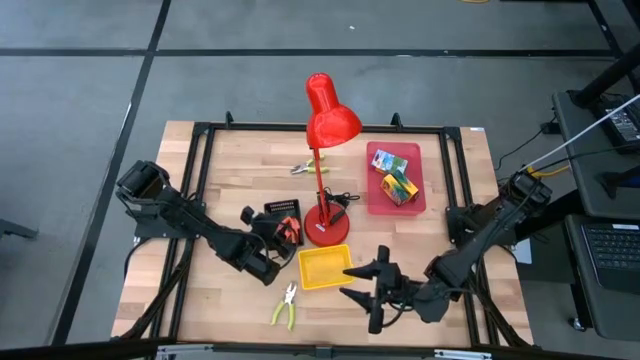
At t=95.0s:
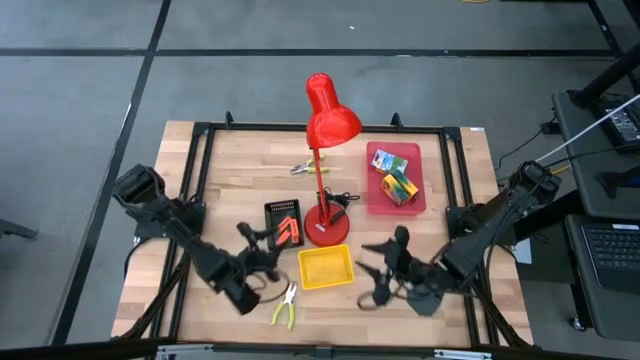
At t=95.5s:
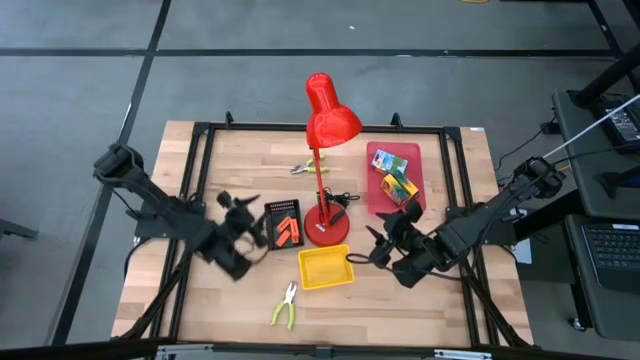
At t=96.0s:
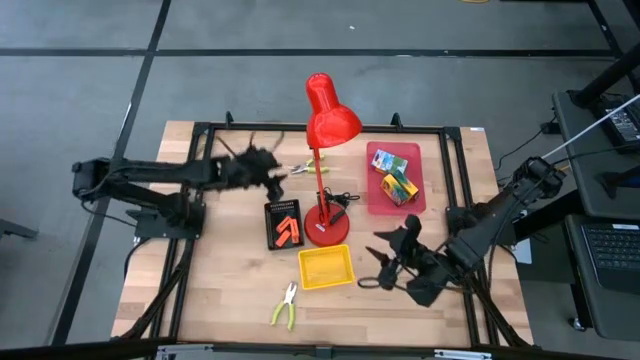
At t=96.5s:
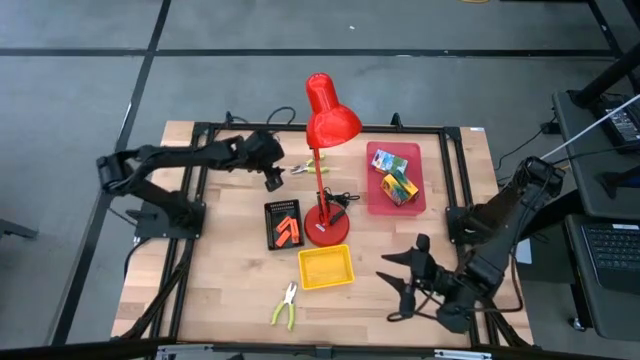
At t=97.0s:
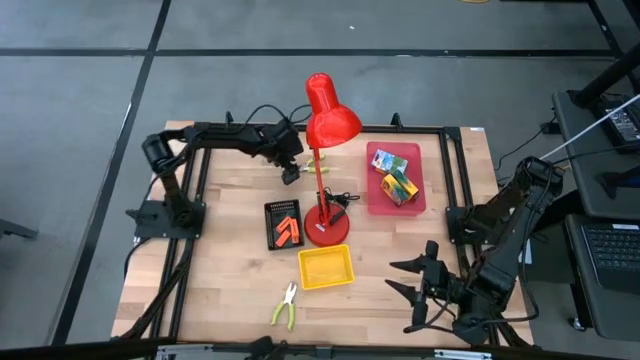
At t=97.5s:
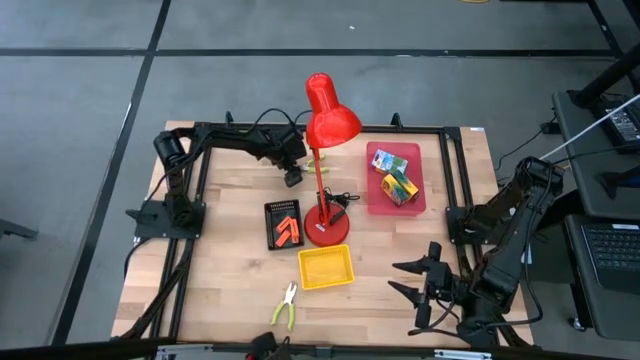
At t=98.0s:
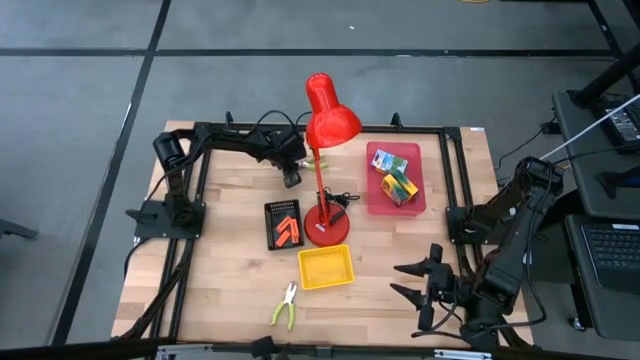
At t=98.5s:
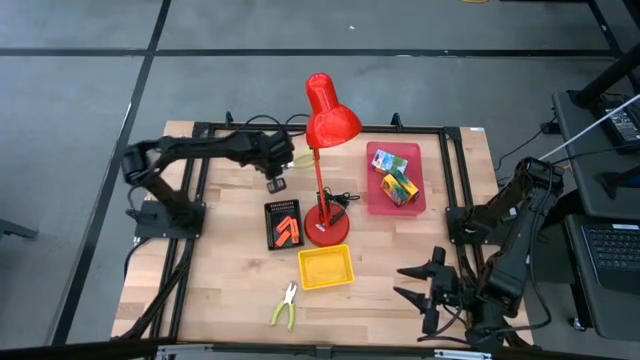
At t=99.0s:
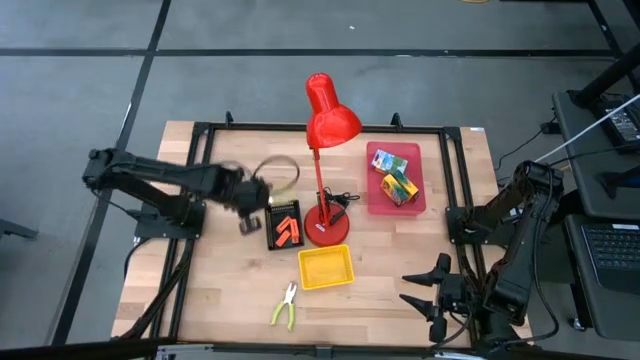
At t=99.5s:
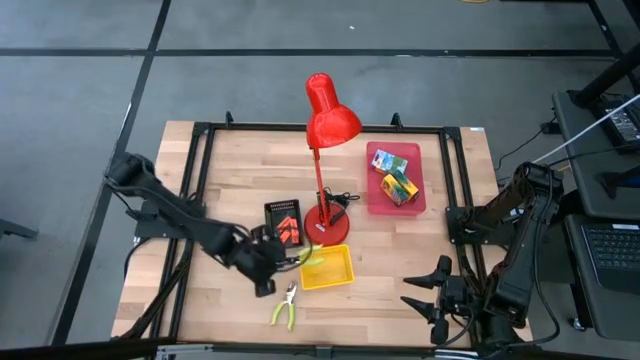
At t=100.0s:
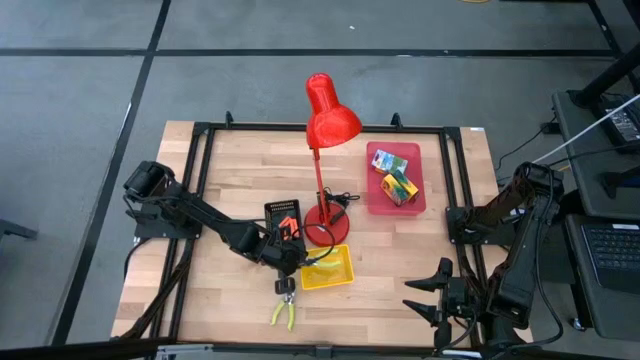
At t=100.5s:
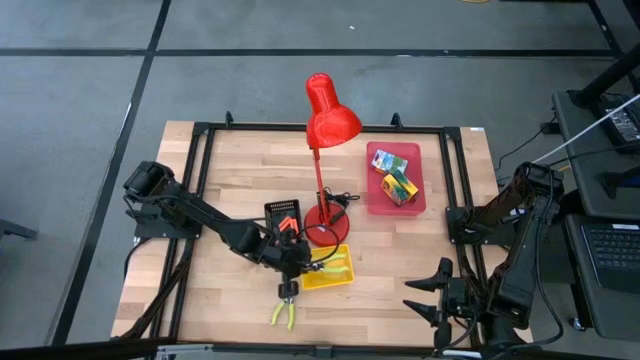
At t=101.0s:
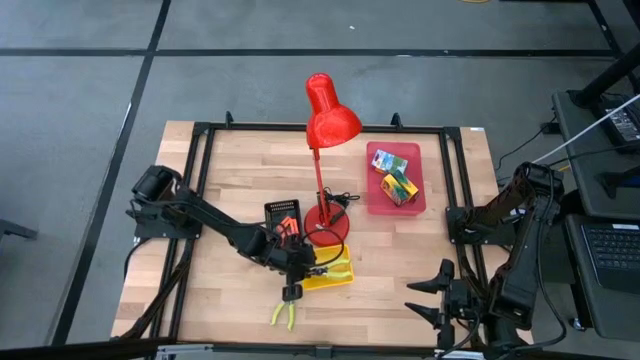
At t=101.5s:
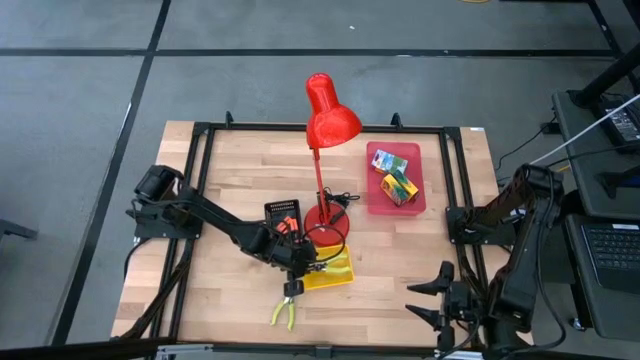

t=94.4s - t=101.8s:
Task: Pick & Place School Supplies
Put the hole puncher into the yellow bin

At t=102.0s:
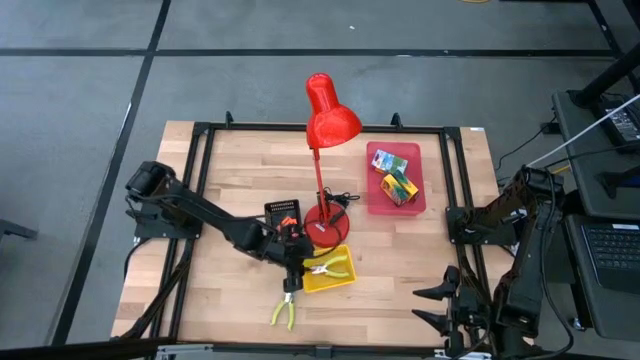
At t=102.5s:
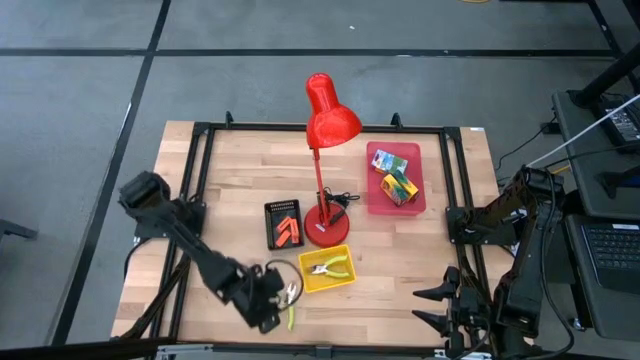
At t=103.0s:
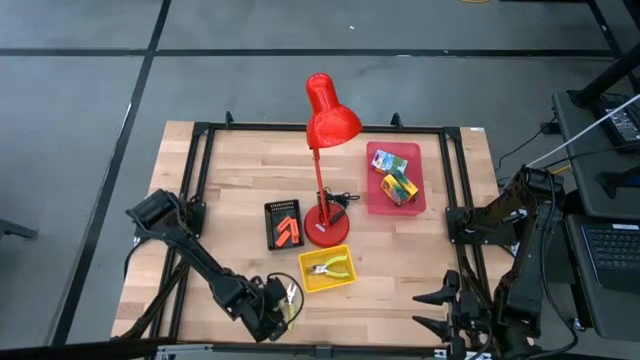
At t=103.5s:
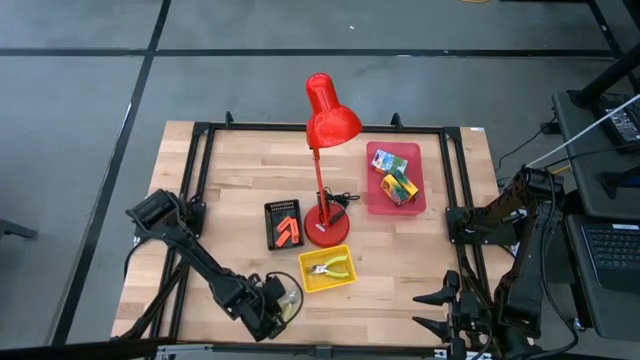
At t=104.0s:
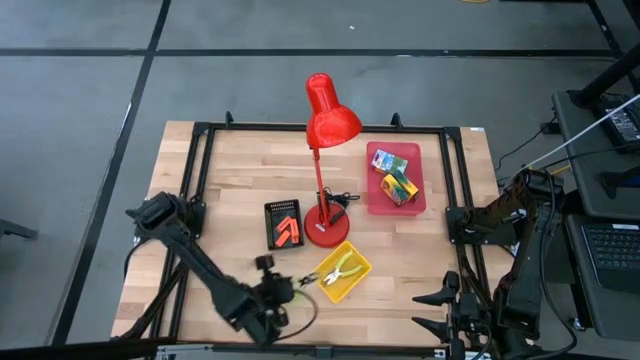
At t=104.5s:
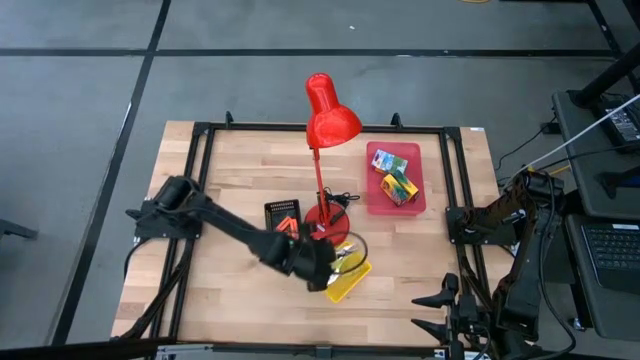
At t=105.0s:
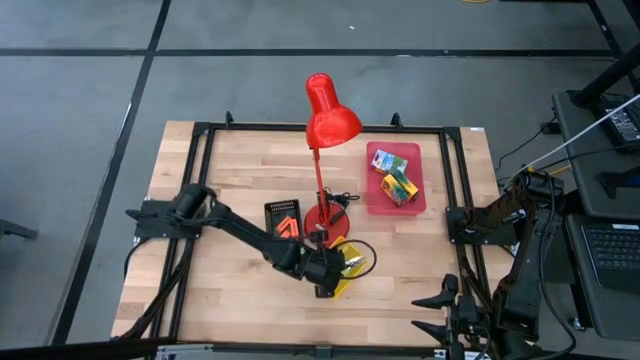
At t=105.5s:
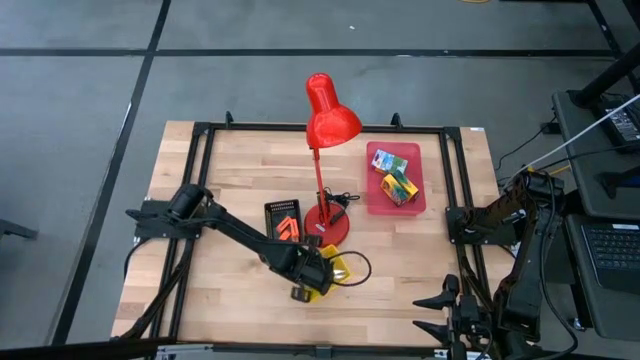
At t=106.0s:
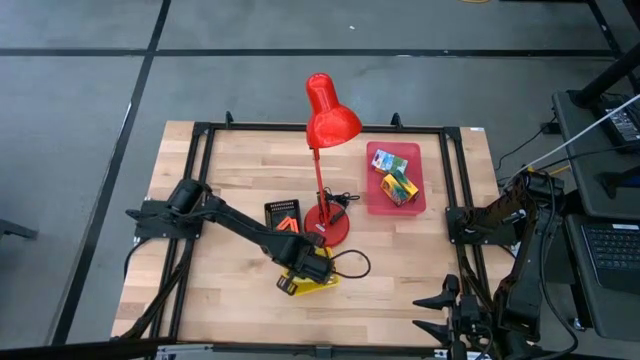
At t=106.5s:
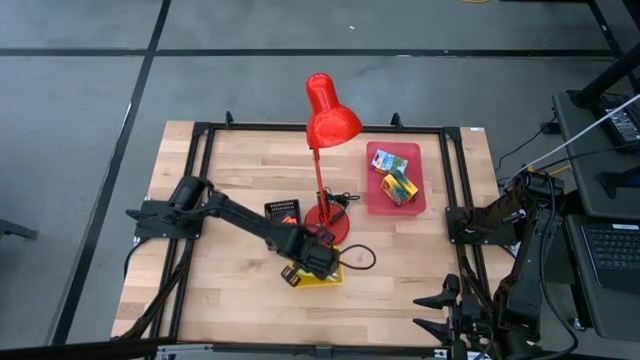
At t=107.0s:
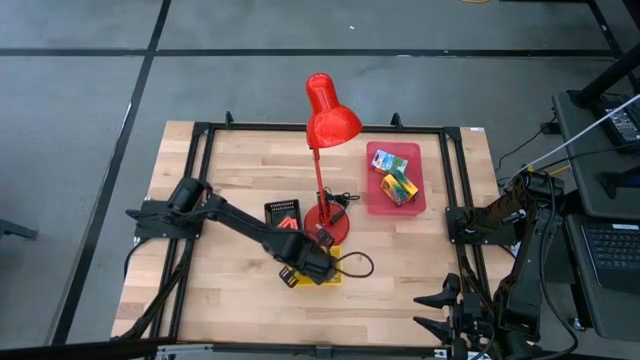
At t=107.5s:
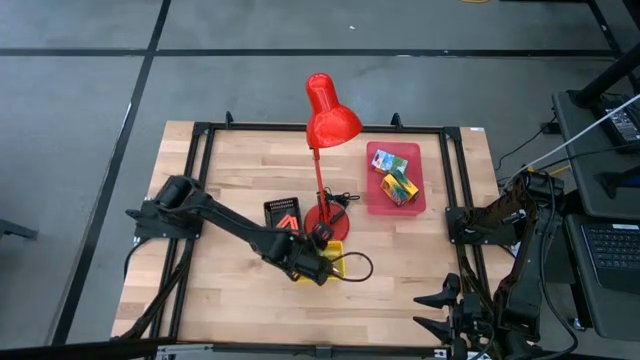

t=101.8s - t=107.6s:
Put the hole puncher into the yellow bin

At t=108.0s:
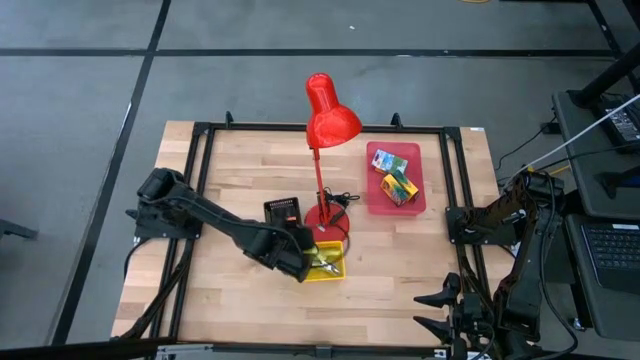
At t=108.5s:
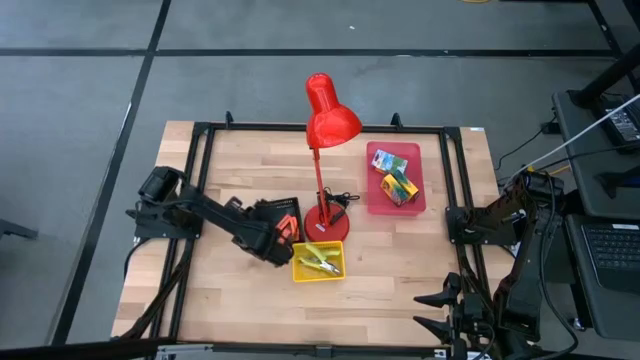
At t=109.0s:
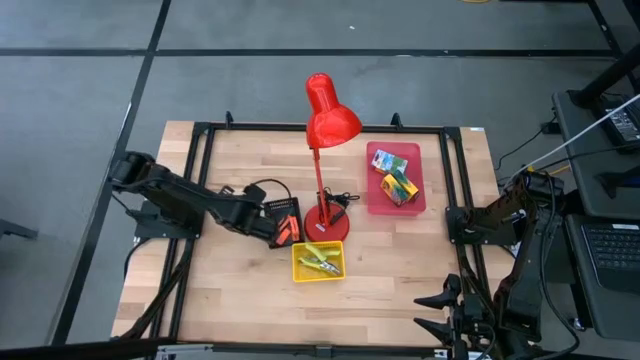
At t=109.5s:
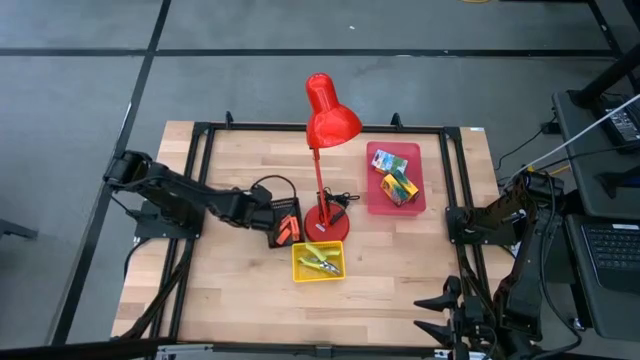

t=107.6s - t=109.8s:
Adjust the black bin

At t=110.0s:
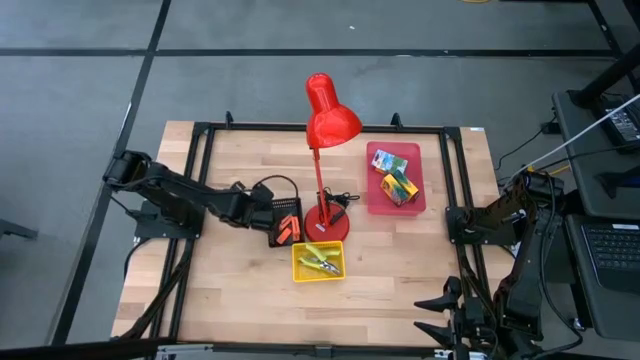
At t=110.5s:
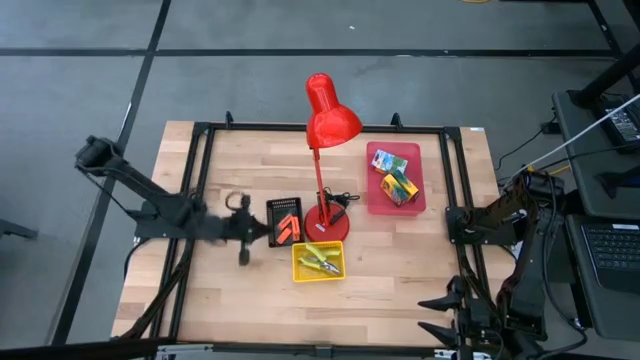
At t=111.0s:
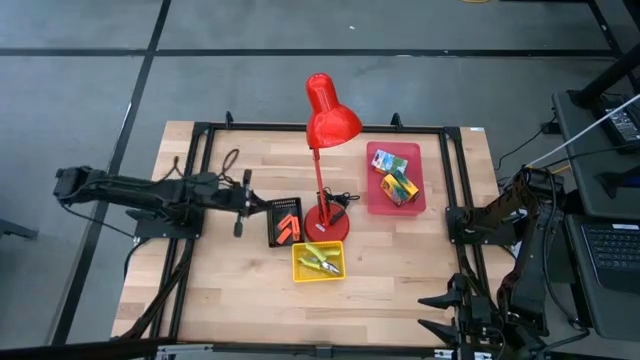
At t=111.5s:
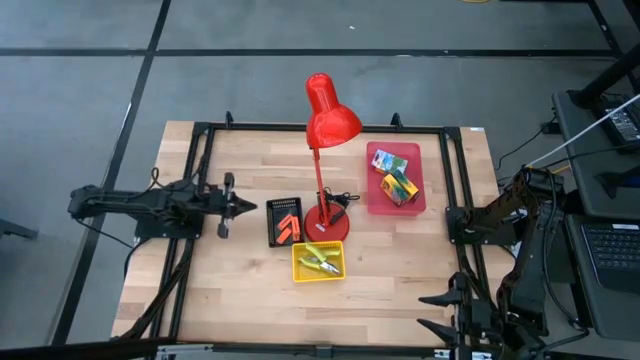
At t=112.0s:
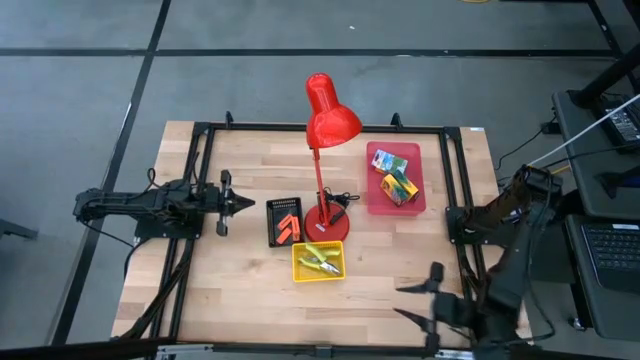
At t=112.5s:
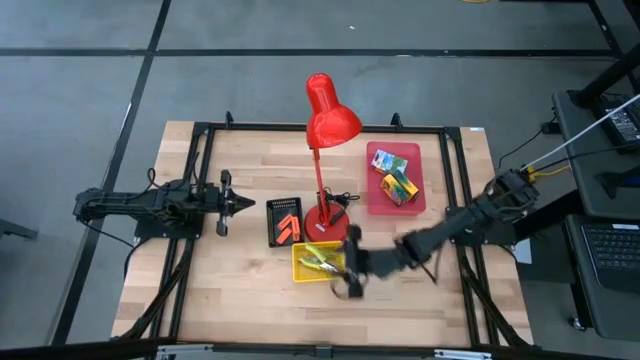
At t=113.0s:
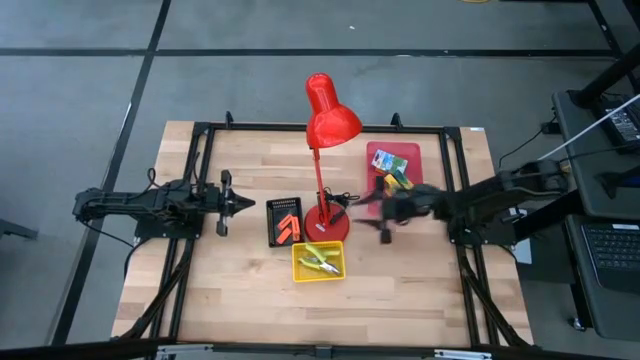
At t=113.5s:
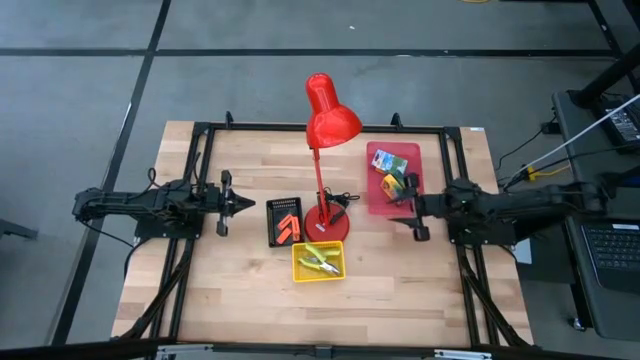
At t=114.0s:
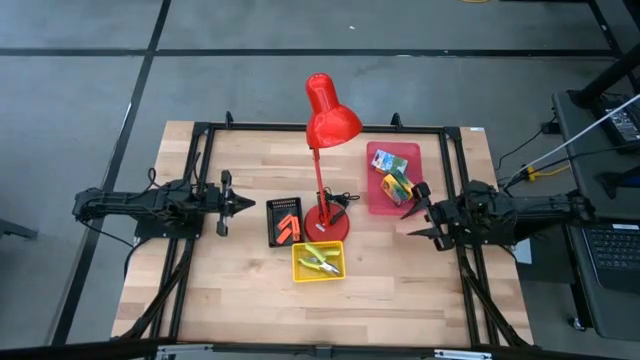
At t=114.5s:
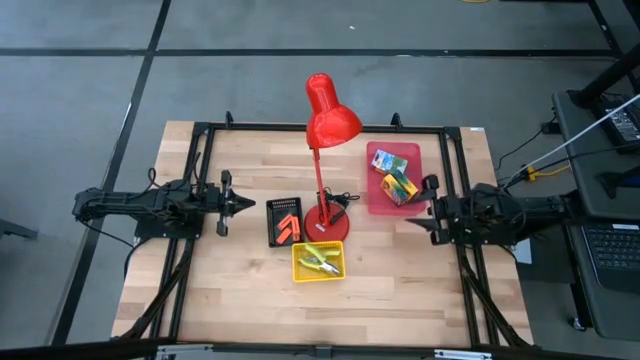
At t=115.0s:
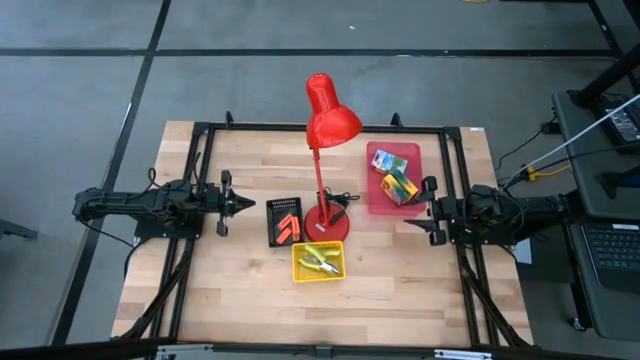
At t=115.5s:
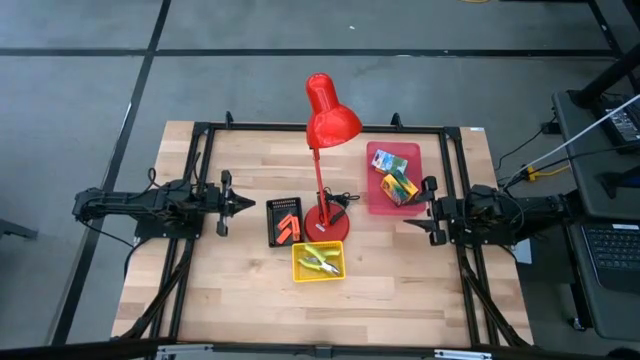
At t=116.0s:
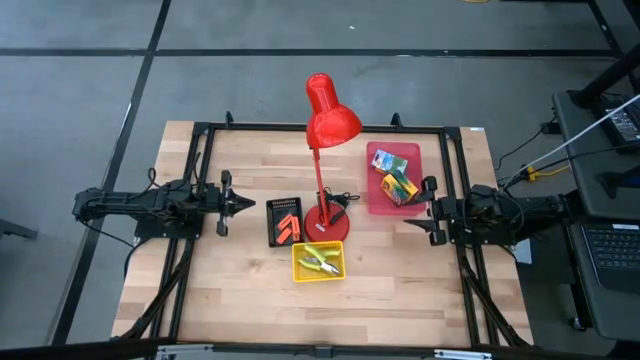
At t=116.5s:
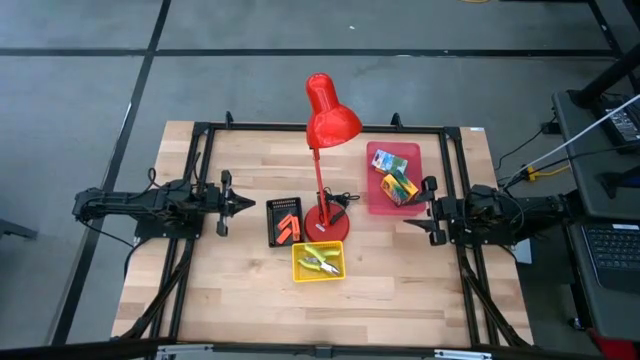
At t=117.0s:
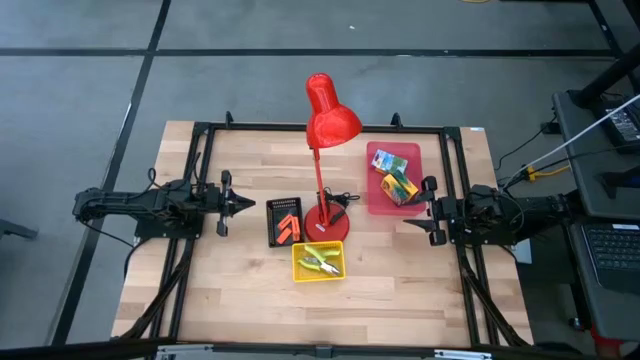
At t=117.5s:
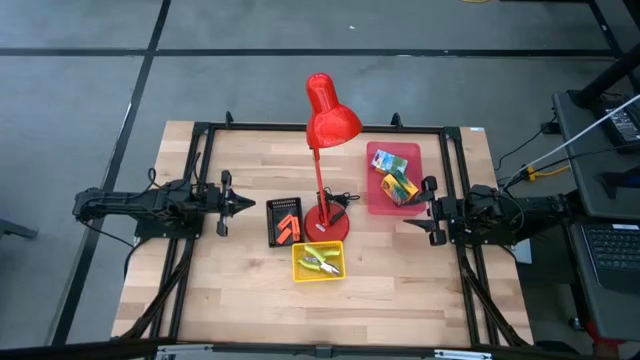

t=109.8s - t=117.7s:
Return to home position
